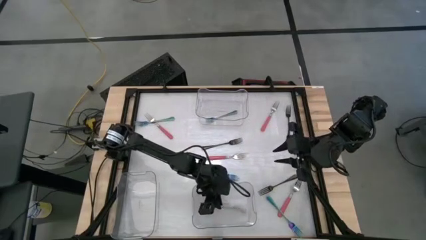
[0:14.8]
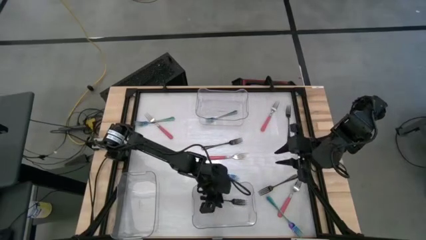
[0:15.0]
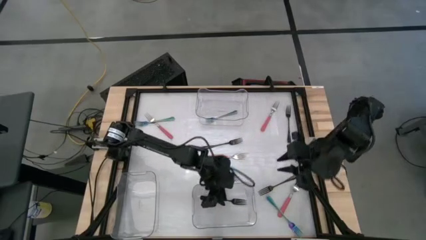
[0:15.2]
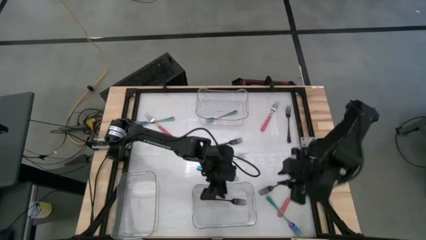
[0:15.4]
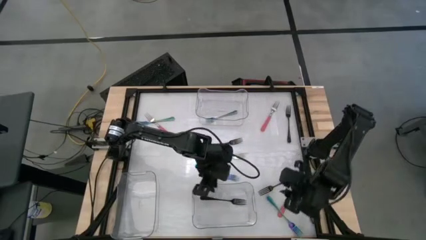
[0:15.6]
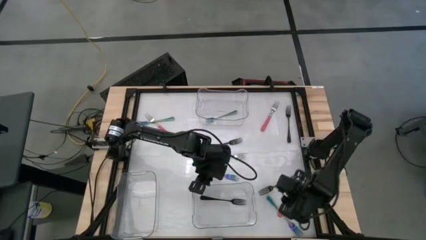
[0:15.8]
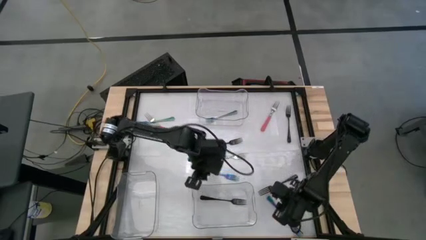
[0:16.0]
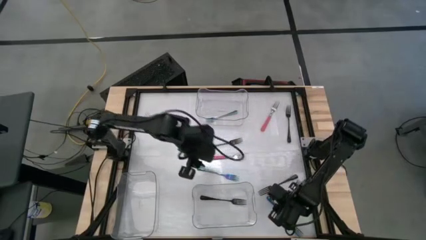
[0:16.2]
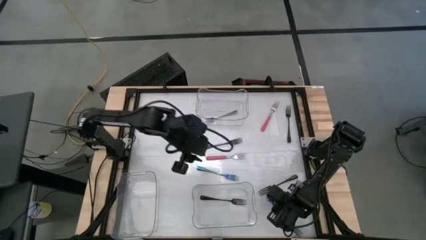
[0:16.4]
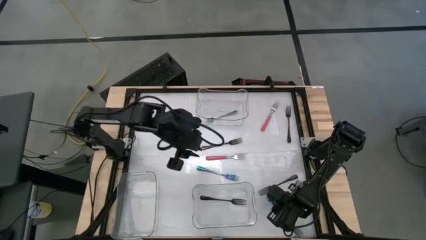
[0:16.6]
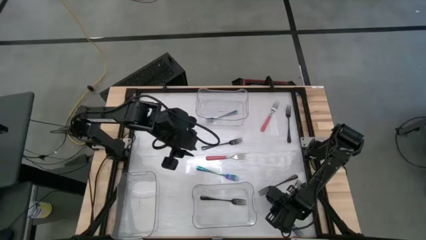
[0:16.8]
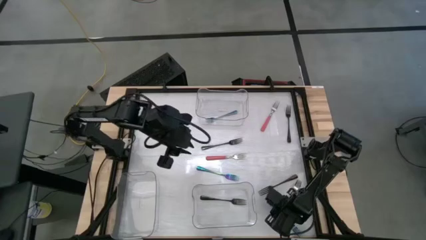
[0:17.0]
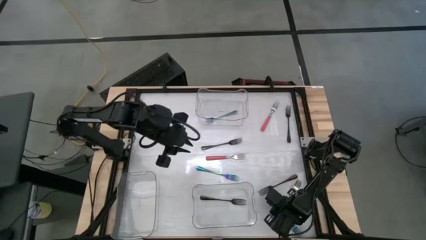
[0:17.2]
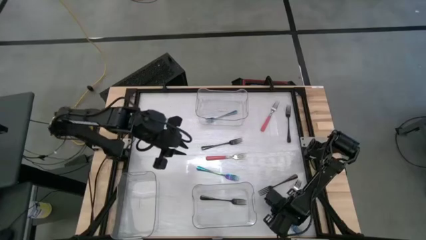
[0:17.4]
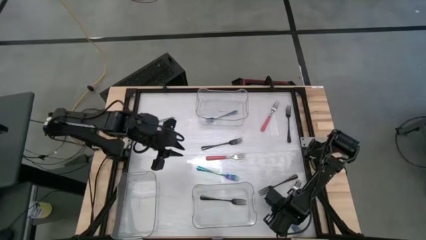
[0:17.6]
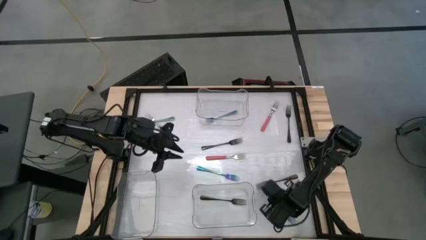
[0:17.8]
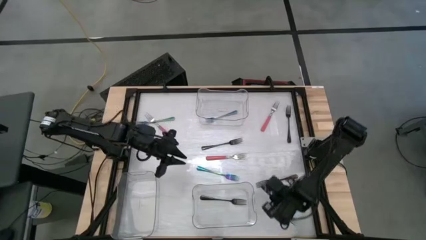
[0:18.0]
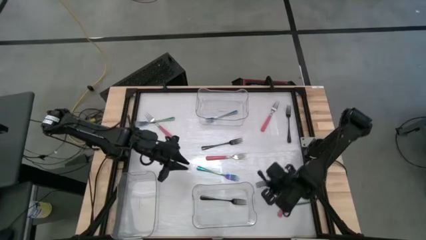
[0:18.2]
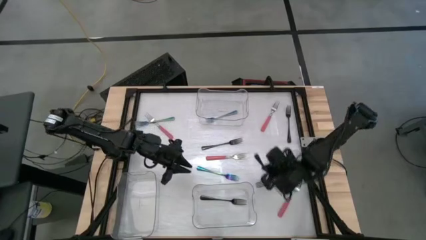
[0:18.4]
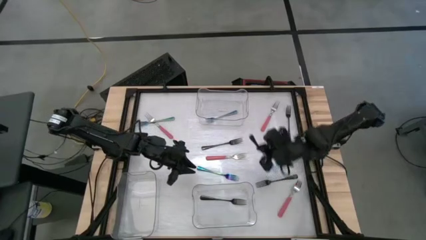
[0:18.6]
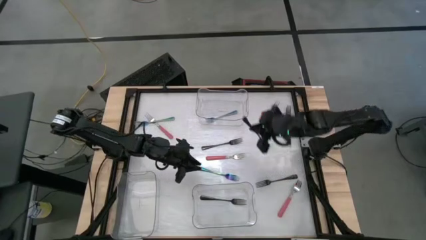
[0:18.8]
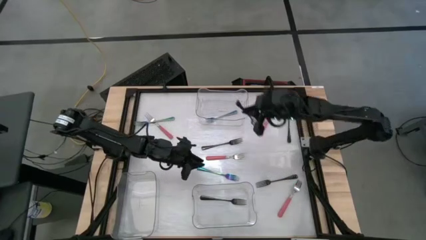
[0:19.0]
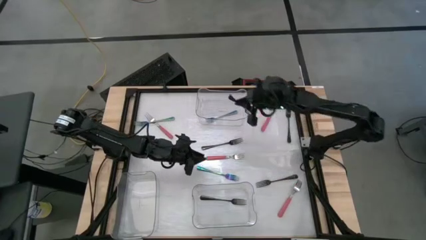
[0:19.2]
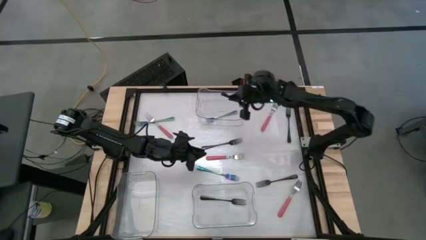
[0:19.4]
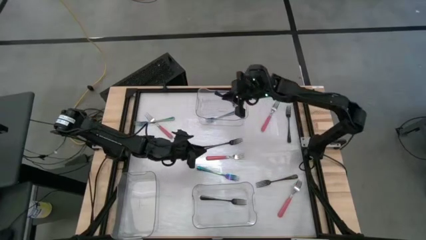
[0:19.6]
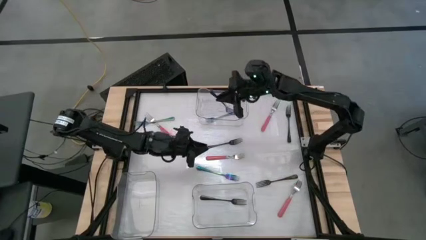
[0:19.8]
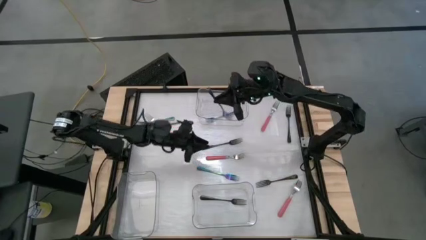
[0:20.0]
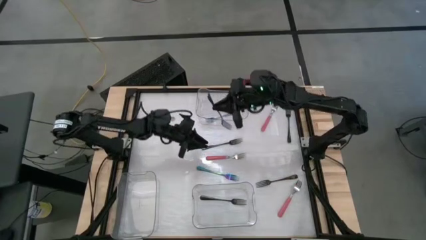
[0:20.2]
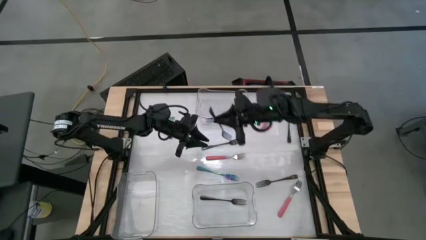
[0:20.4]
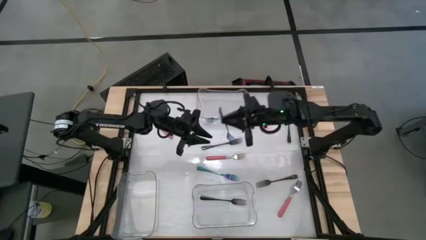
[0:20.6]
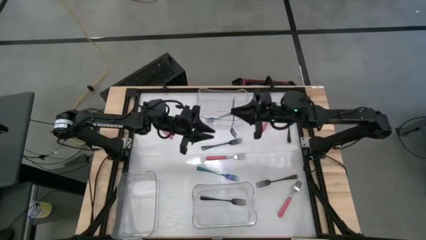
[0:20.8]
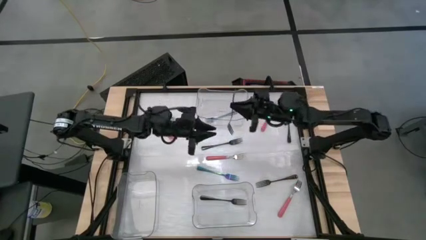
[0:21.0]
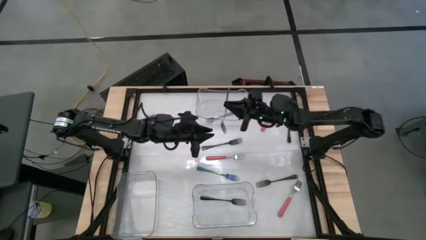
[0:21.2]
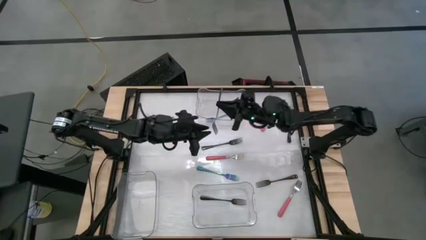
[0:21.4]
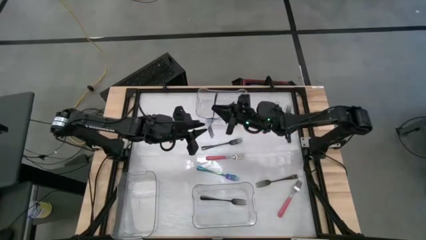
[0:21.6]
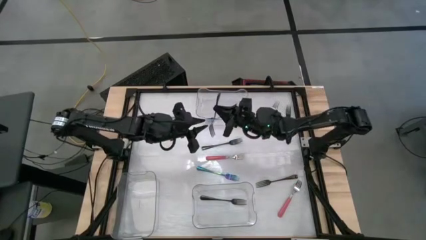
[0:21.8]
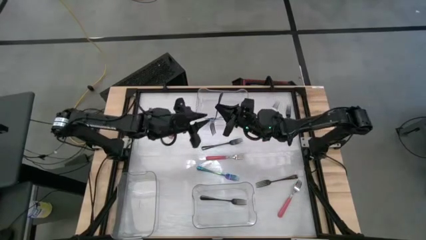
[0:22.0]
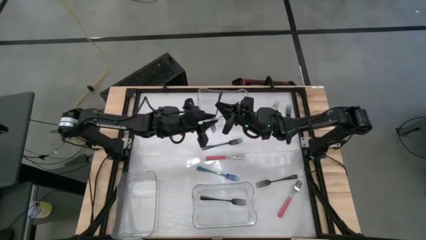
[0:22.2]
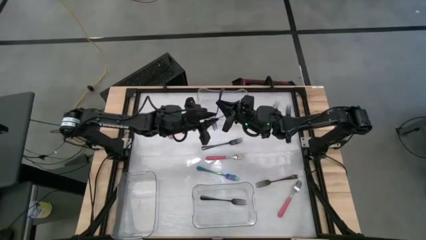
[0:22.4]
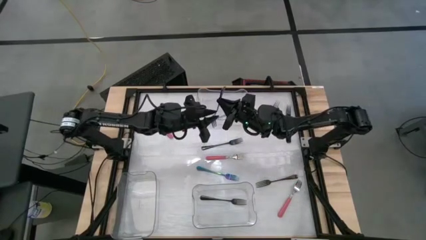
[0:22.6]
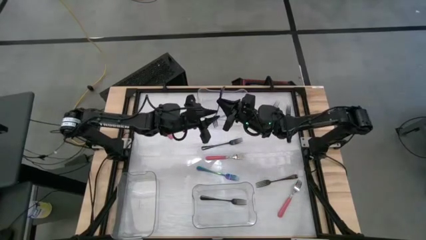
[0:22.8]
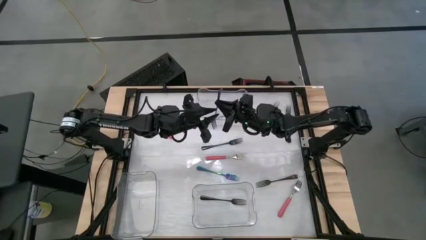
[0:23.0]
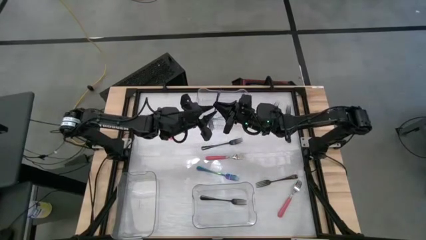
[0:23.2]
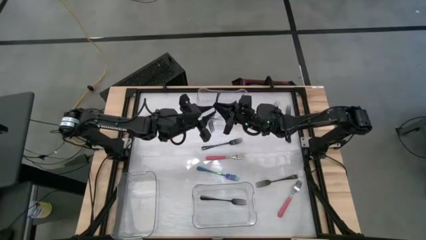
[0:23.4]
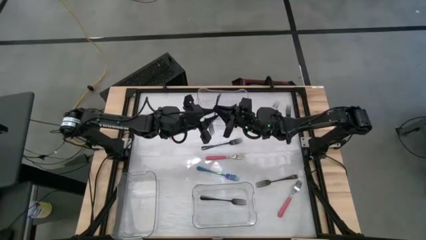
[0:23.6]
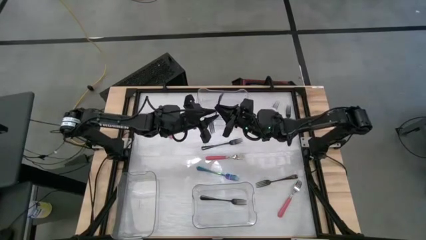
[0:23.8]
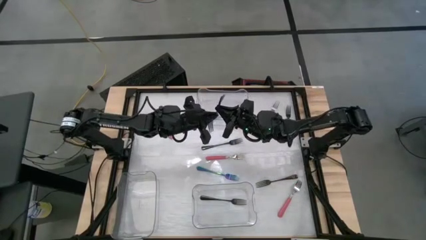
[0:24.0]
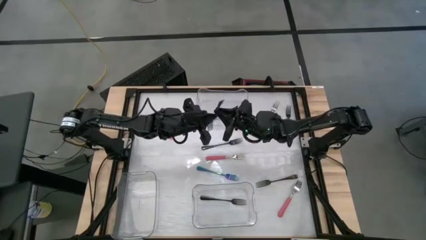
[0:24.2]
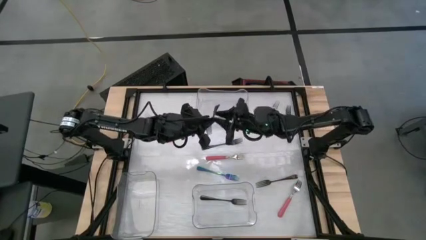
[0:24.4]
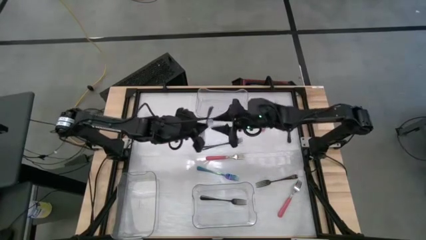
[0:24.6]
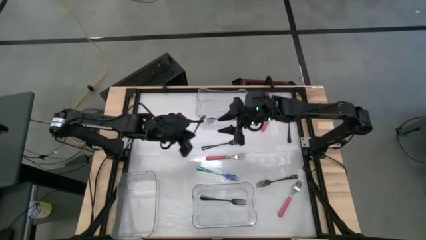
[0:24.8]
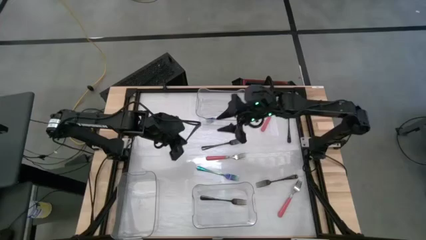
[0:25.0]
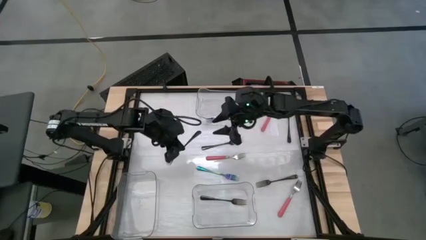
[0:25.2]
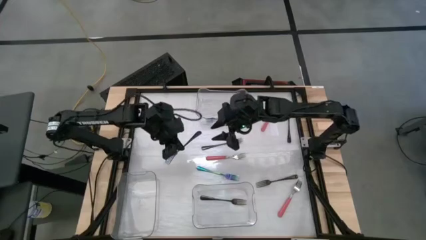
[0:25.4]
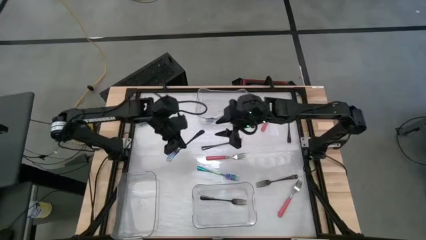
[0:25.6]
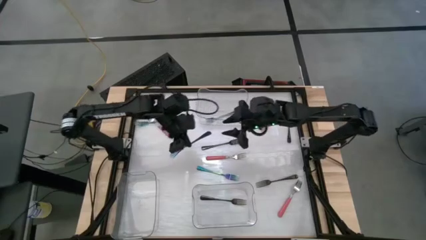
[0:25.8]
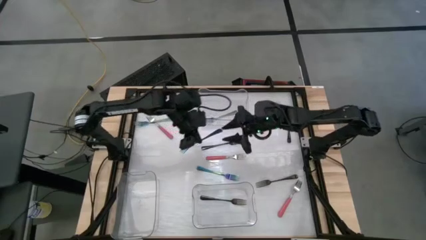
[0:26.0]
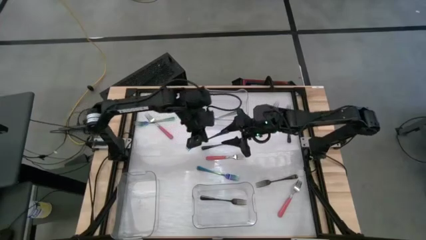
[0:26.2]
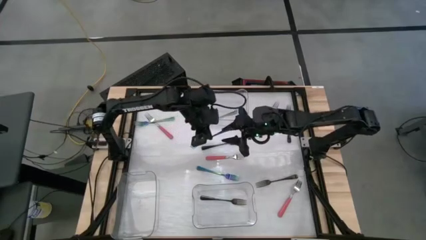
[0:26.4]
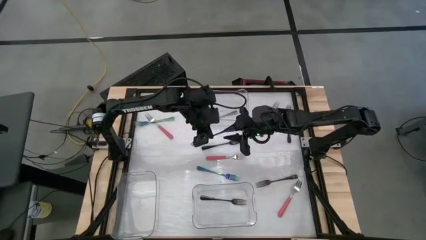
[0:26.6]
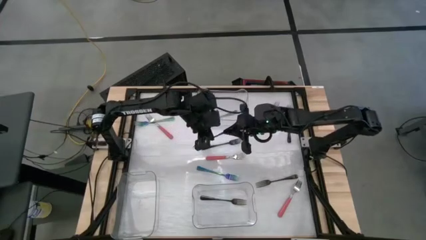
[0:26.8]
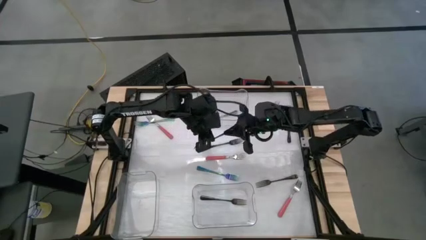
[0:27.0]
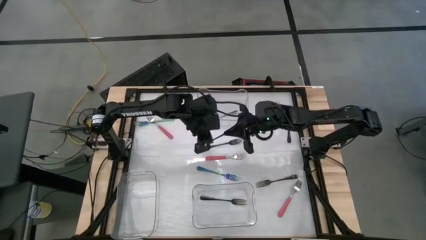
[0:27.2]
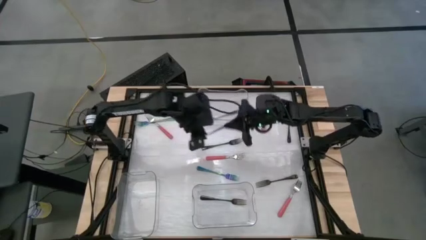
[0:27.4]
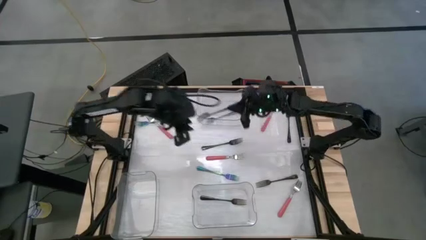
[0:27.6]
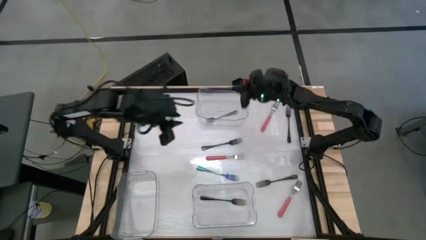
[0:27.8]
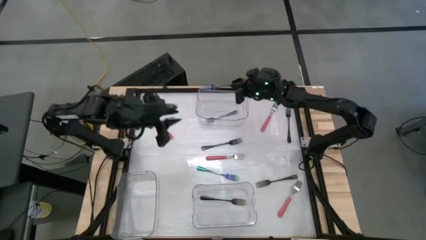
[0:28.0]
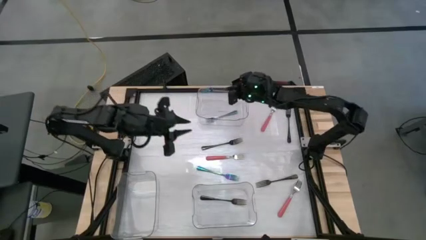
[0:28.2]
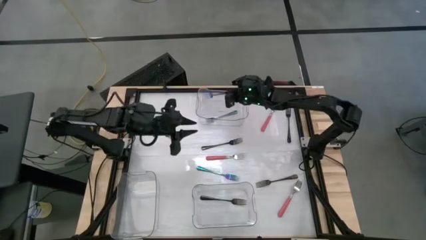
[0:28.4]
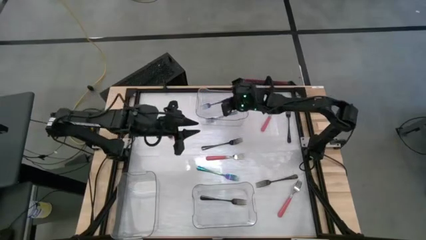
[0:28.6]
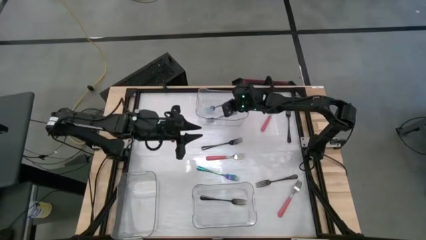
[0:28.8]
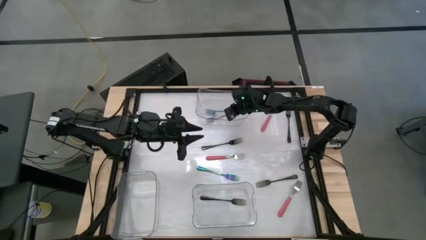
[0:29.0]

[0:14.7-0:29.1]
Task: Sort silverware by color (type)
Put the blue fork into the top transparent bin
